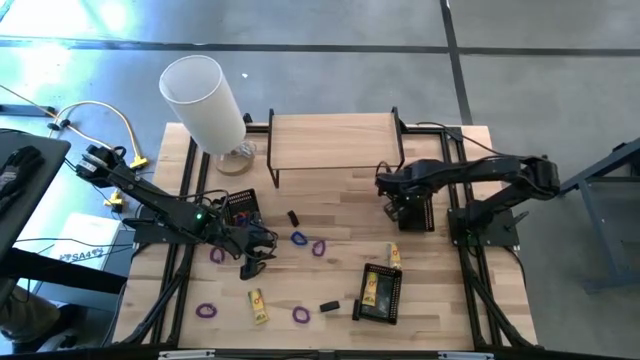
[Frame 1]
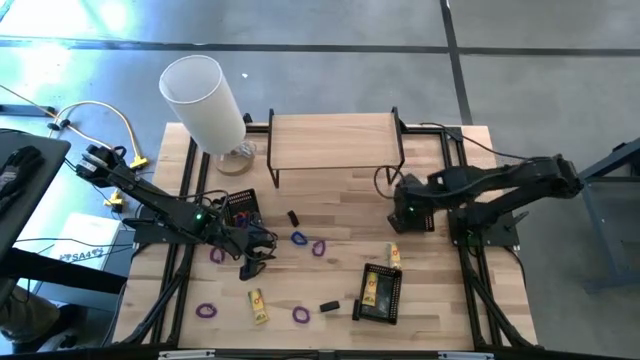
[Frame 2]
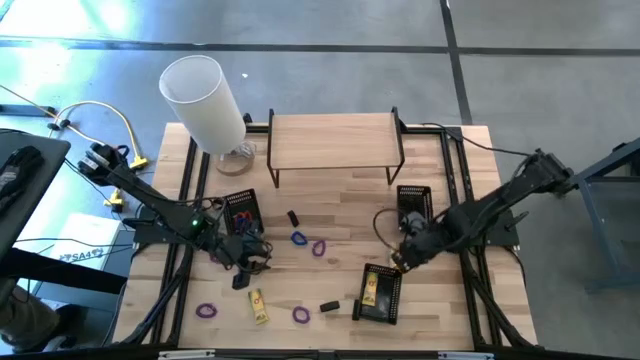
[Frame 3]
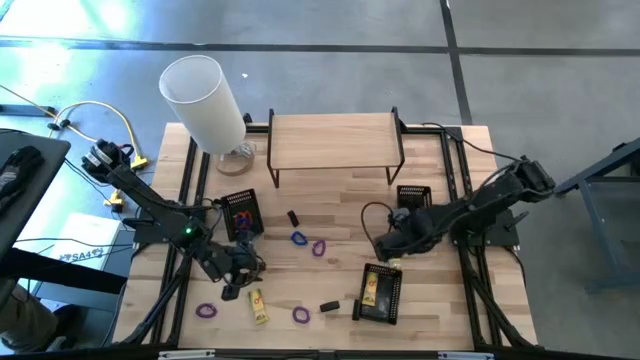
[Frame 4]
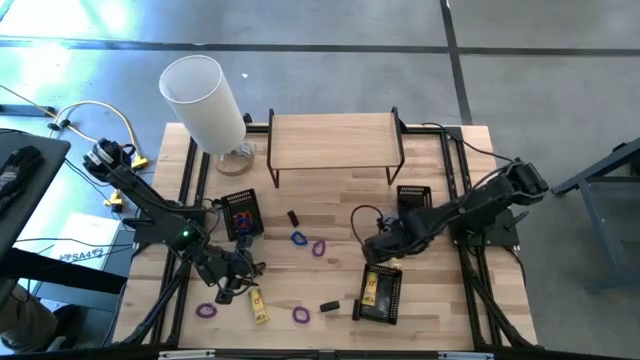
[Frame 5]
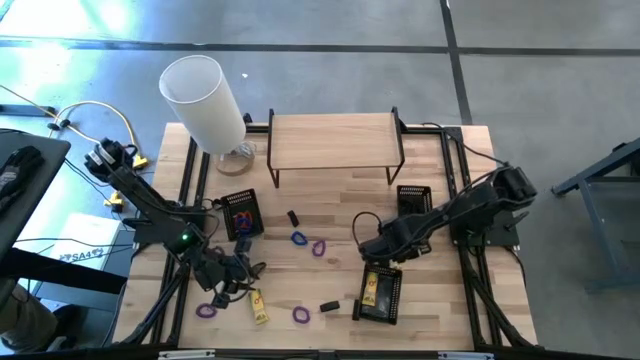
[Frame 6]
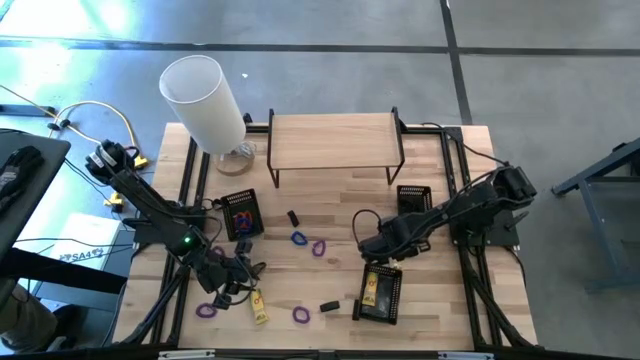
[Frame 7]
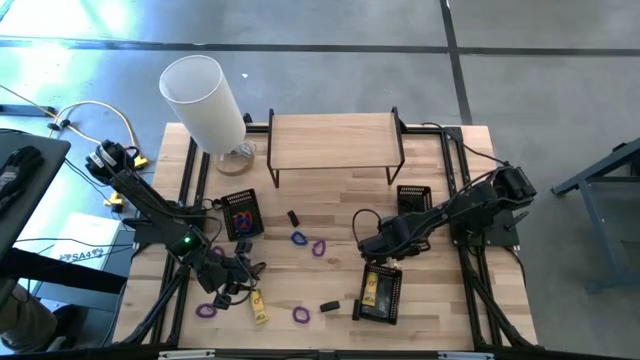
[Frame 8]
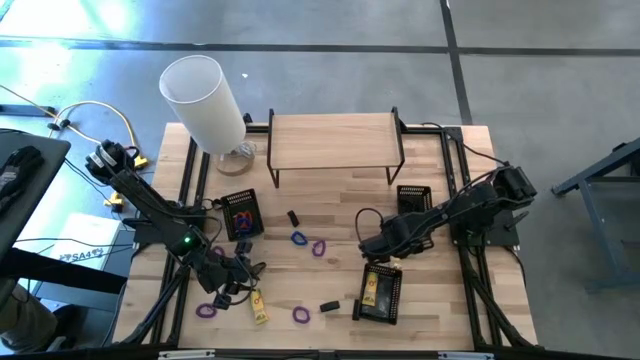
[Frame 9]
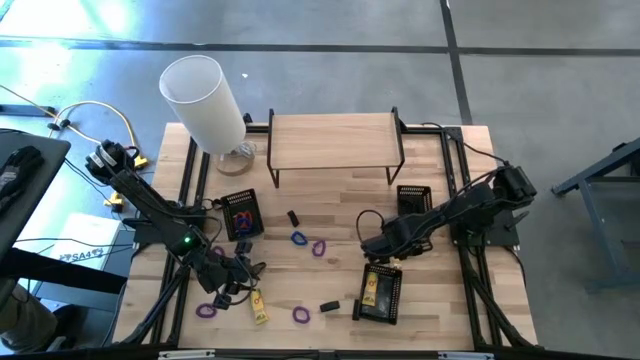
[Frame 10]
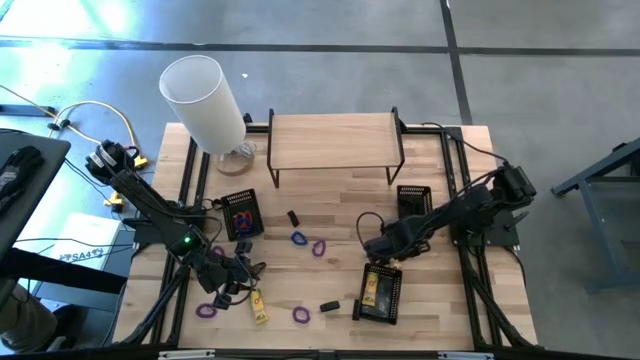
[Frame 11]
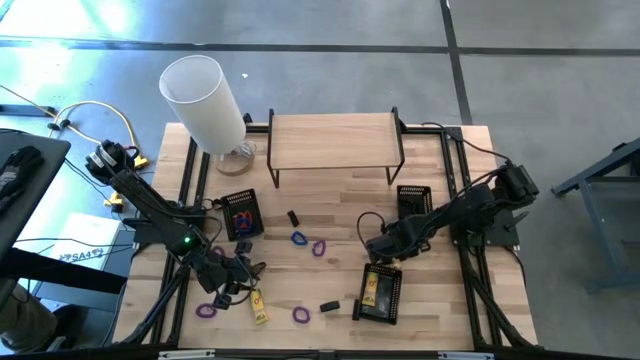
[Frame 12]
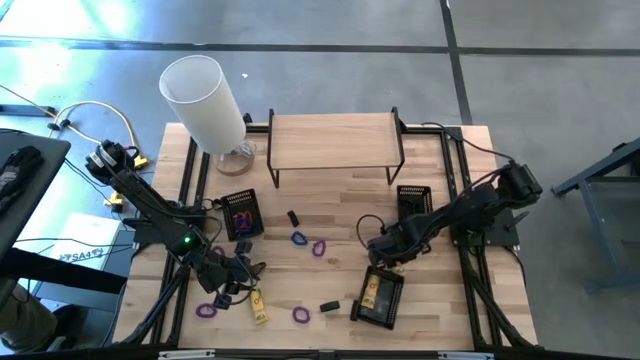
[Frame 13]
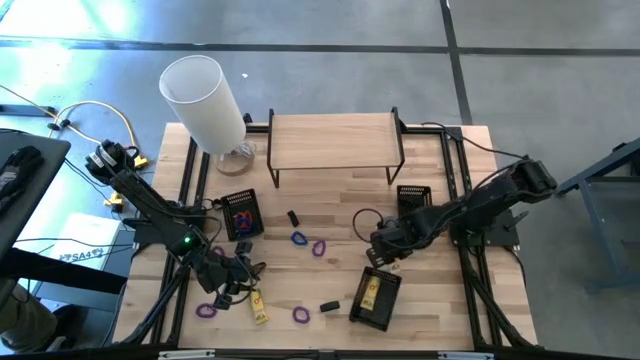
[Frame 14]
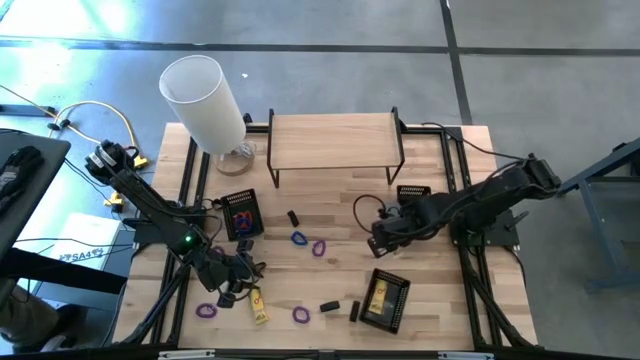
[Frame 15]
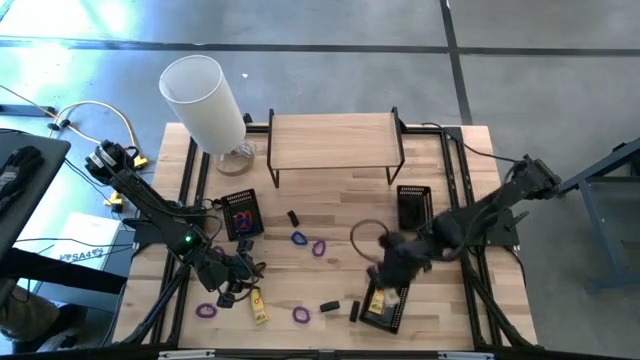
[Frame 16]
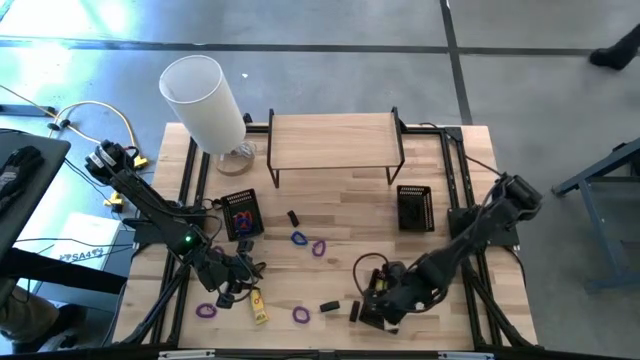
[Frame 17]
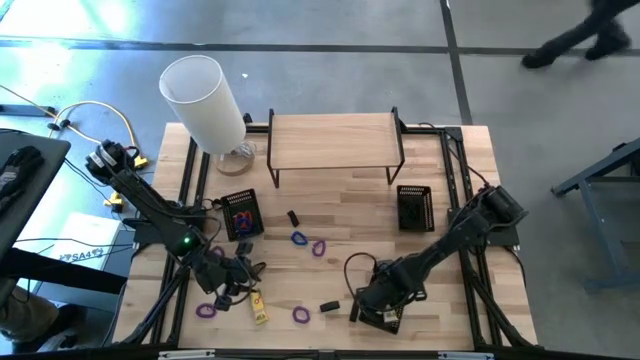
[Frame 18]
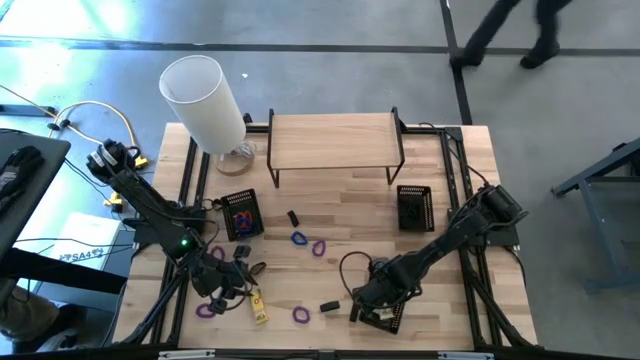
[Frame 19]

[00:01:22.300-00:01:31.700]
Task: Pick & Place Office Desk Supplies
Put the right crayon box into the bottom bin

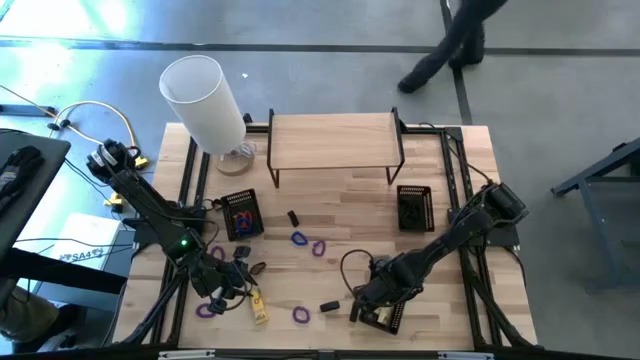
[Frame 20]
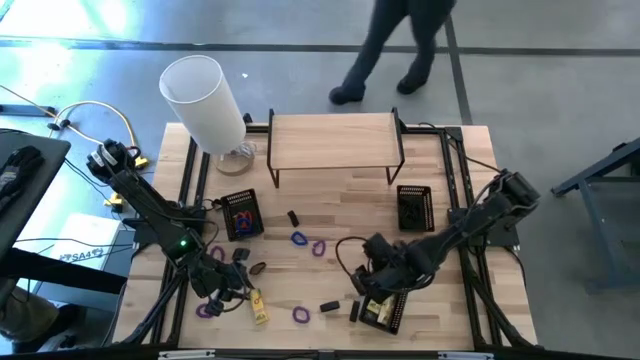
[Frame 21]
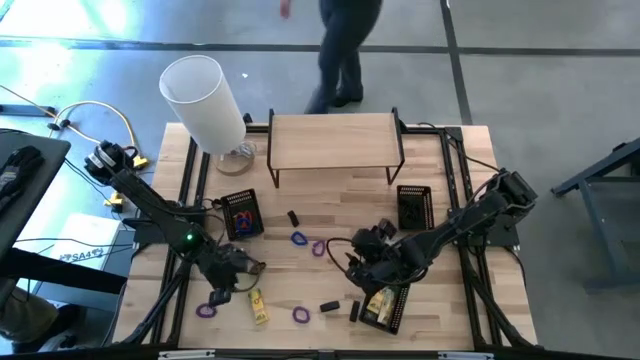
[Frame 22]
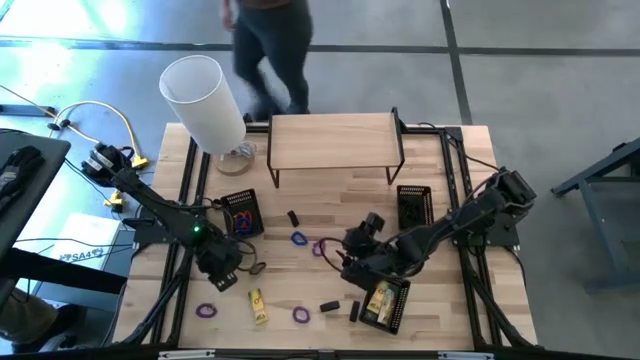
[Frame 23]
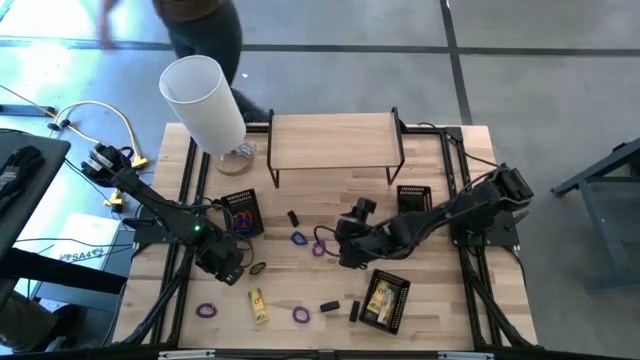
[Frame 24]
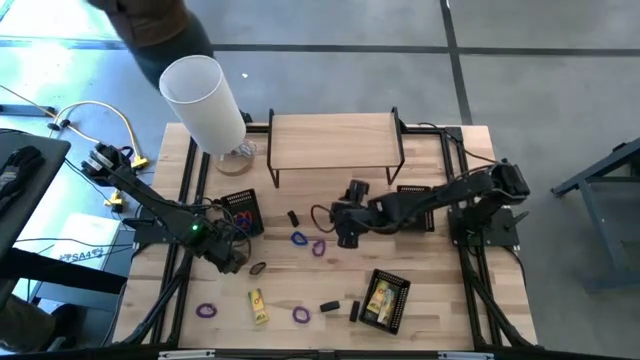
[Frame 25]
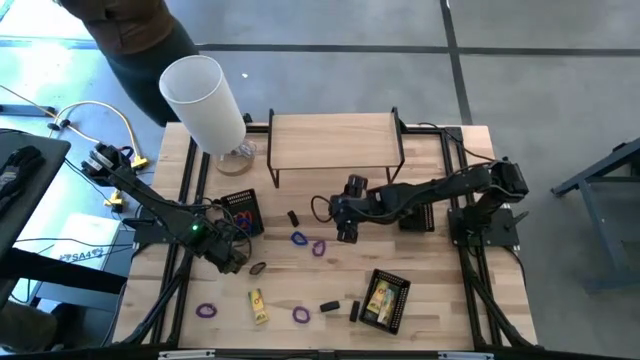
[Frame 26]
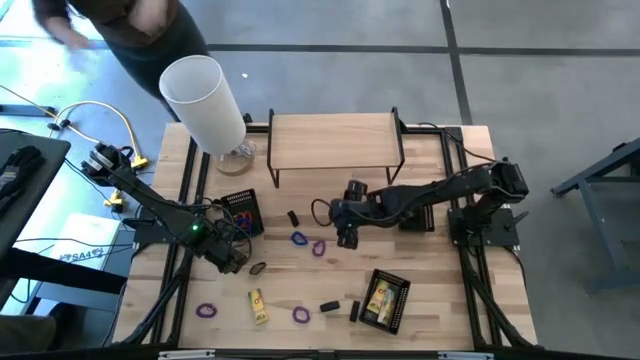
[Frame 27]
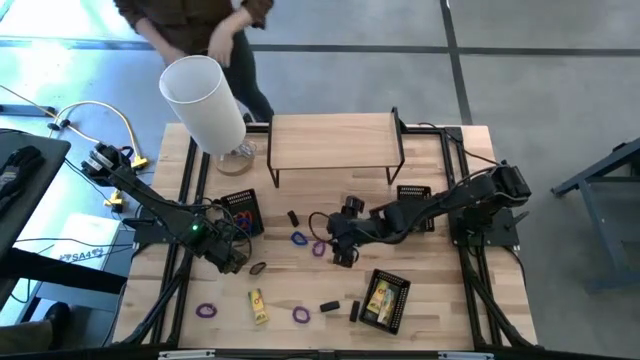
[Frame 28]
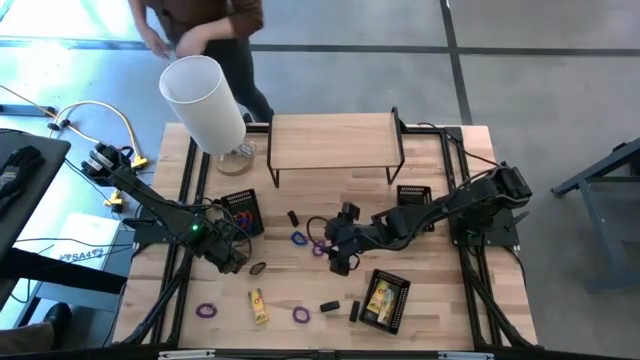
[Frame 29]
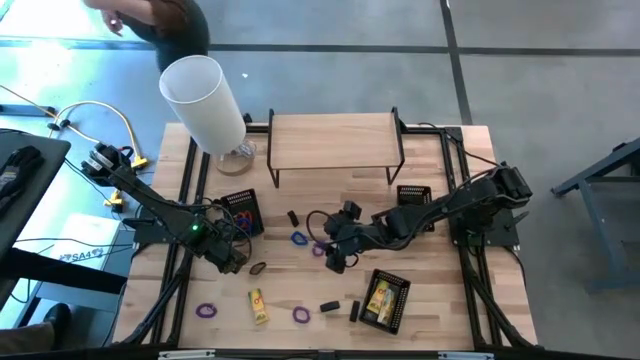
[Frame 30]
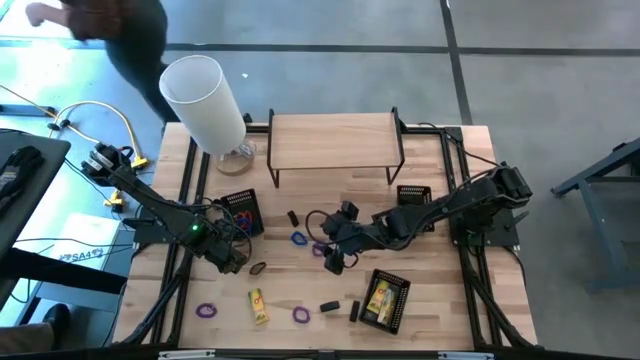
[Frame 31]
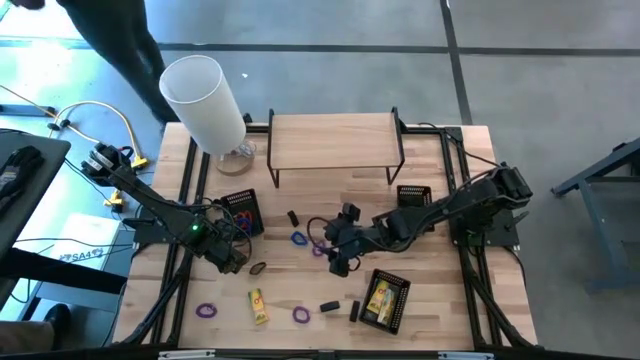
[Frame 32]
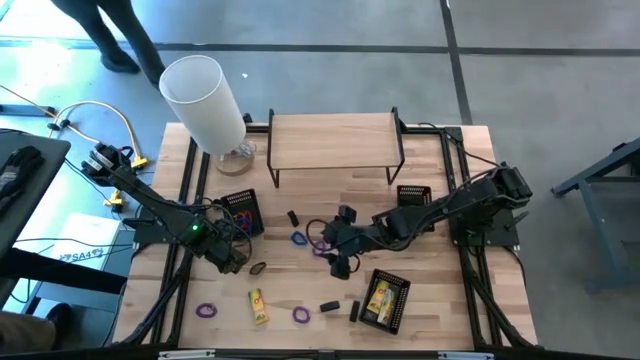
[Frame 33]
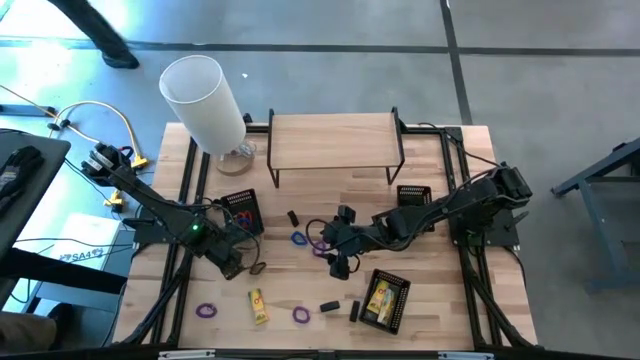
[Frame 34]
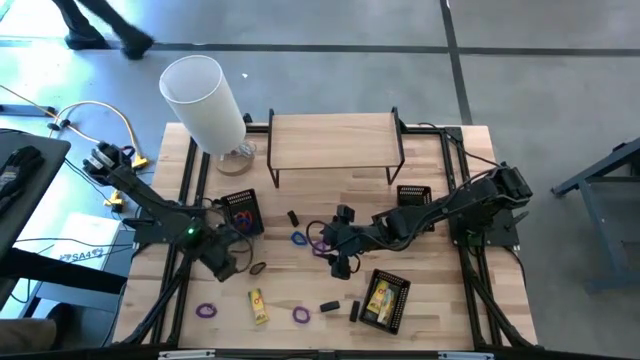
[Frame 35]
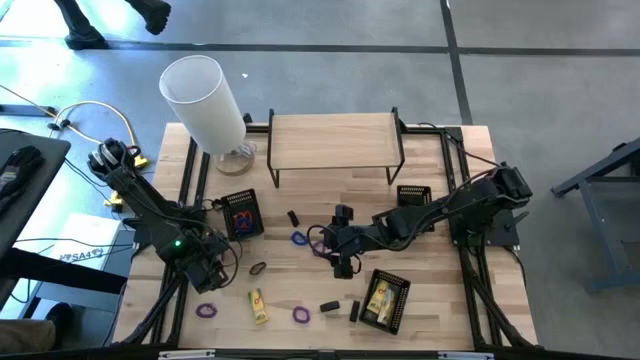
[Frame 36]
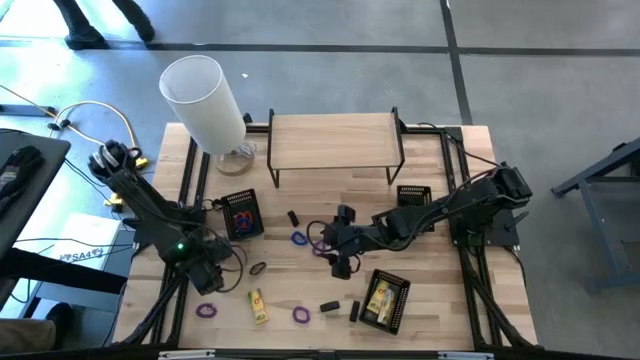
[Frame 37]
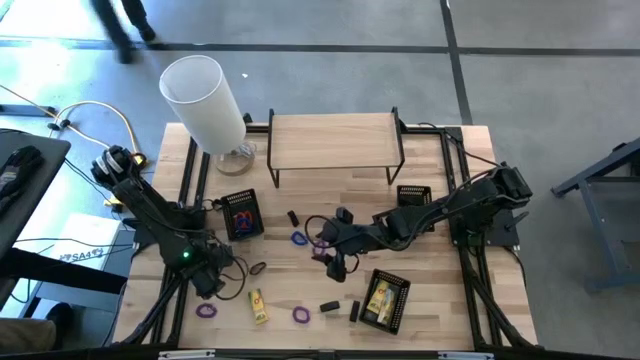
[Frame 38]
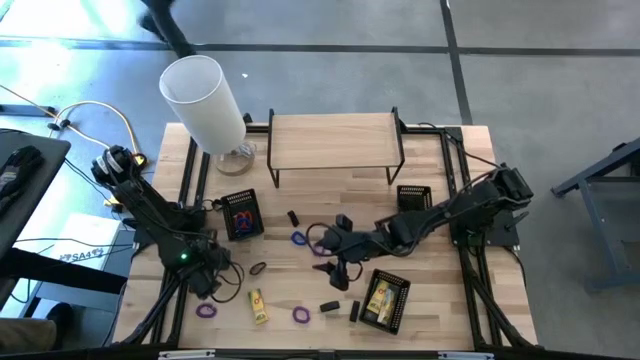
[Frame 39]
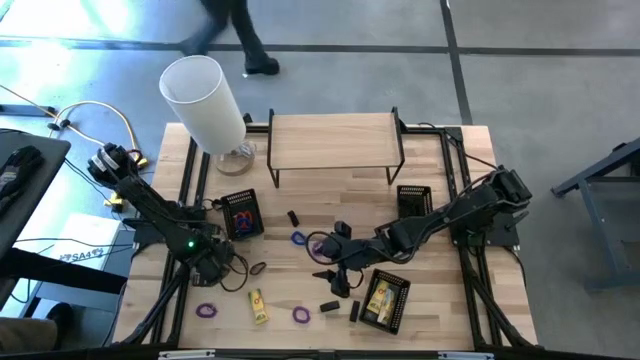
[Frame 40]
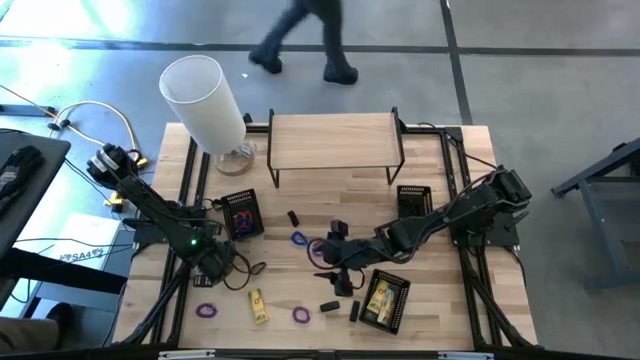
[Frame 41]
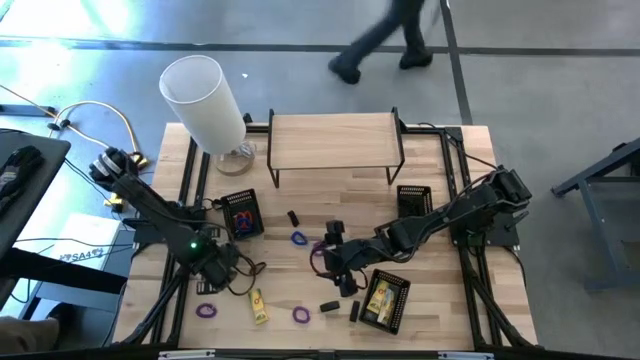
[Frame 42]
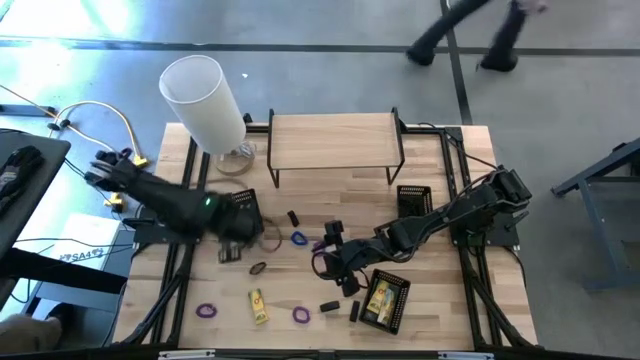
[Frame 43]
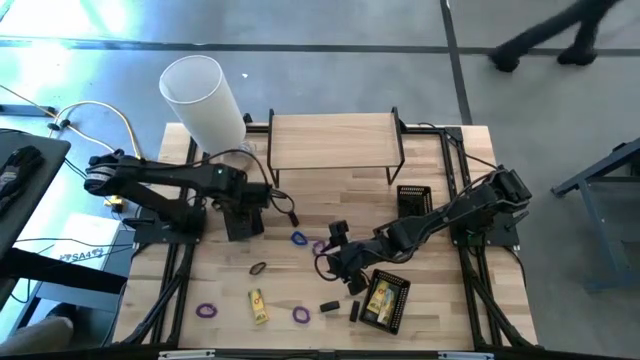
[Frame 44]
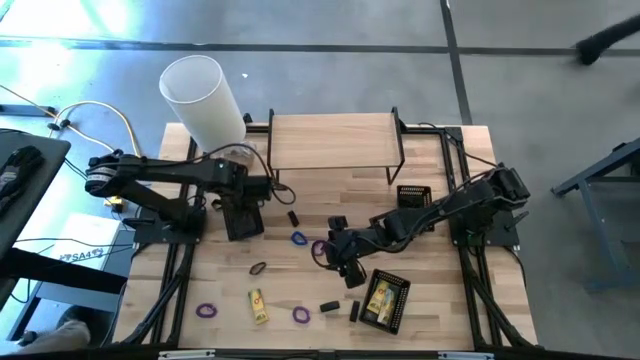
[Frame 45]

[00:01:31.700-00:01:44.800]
Put the purple spiral keychain into the top left bin
